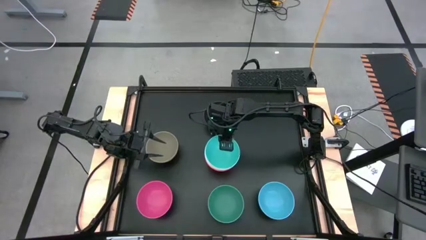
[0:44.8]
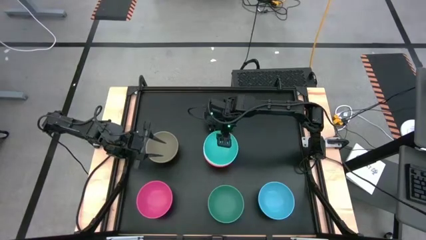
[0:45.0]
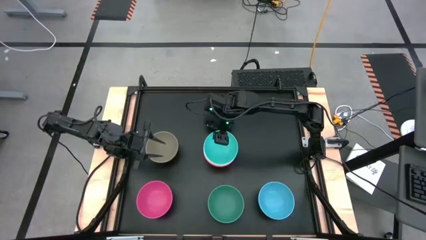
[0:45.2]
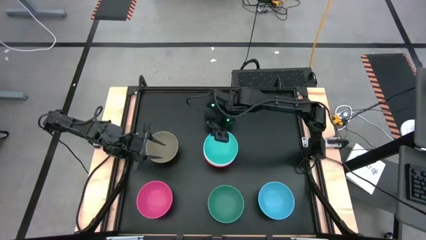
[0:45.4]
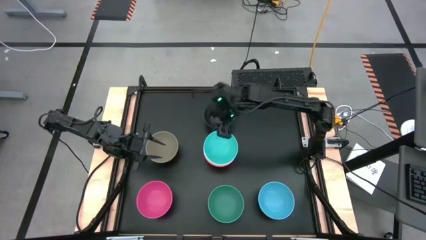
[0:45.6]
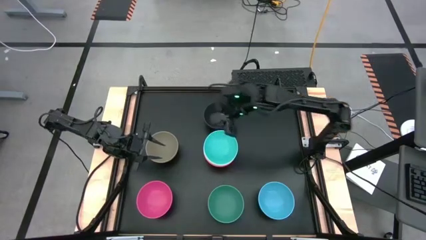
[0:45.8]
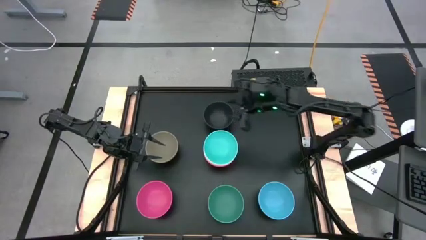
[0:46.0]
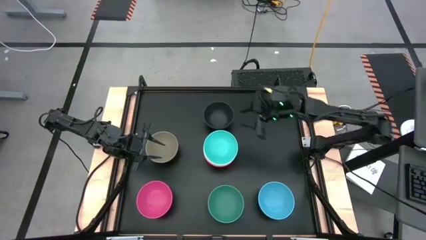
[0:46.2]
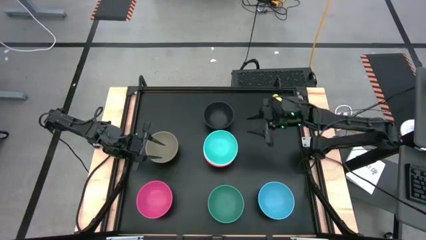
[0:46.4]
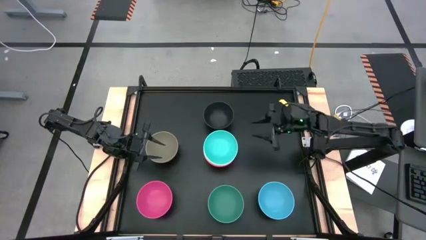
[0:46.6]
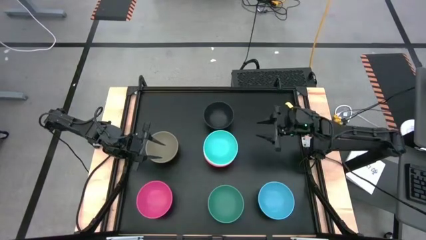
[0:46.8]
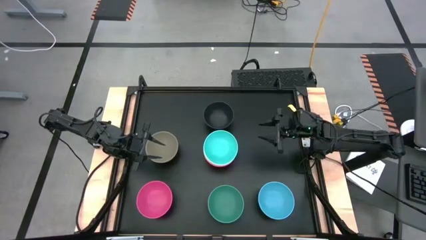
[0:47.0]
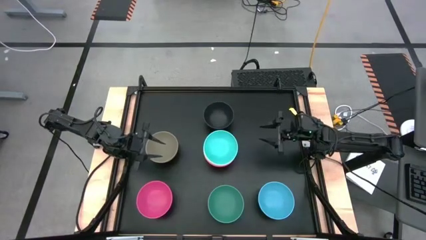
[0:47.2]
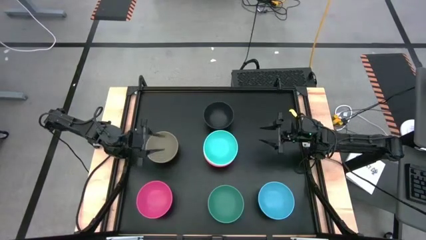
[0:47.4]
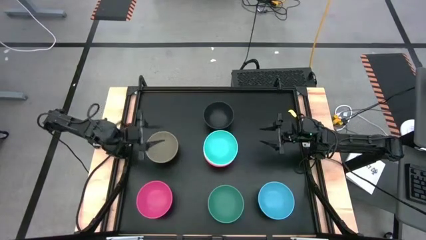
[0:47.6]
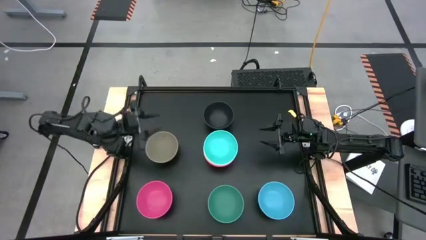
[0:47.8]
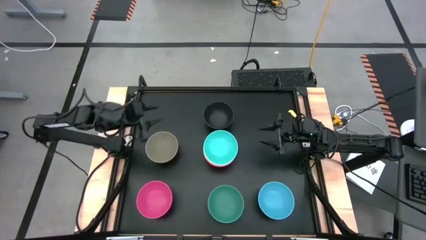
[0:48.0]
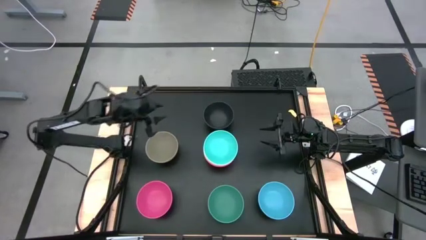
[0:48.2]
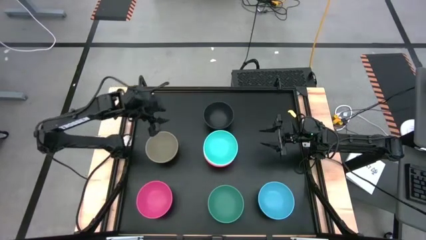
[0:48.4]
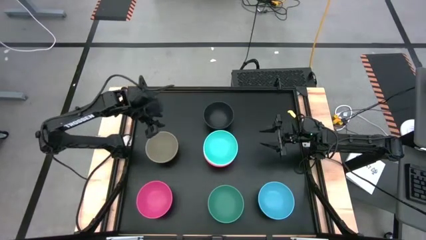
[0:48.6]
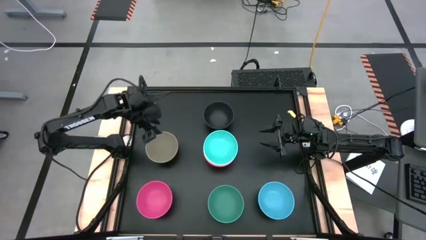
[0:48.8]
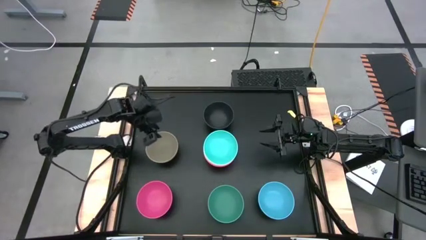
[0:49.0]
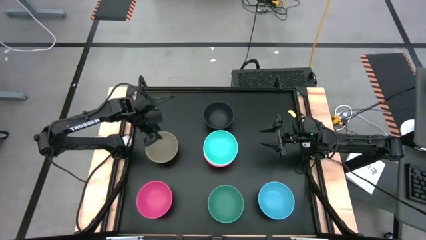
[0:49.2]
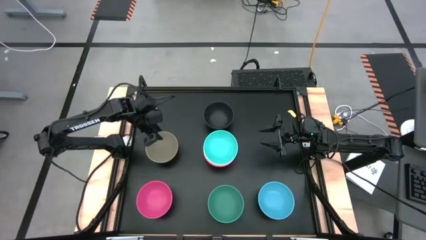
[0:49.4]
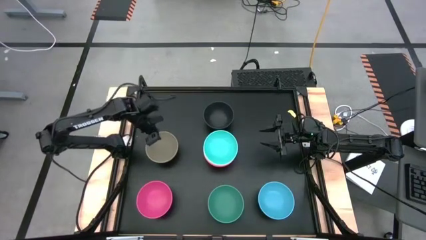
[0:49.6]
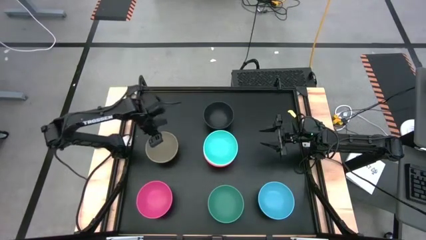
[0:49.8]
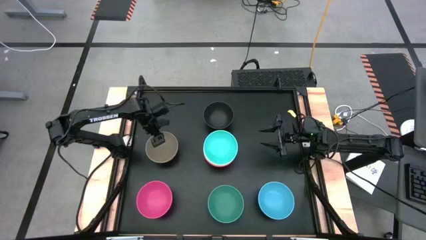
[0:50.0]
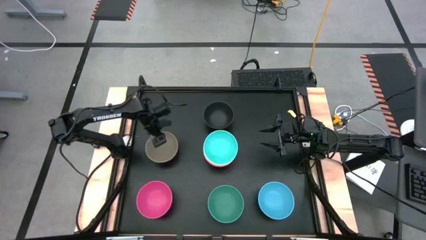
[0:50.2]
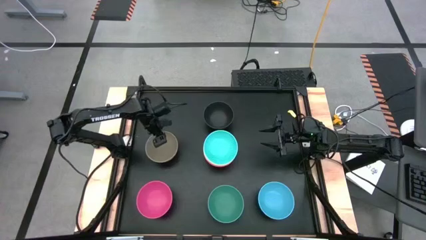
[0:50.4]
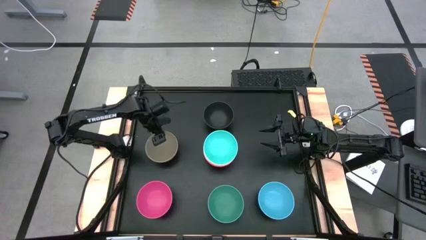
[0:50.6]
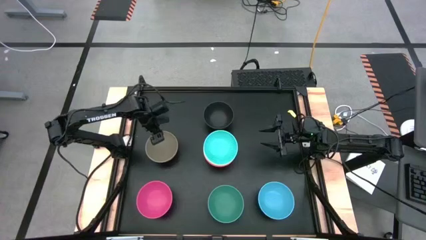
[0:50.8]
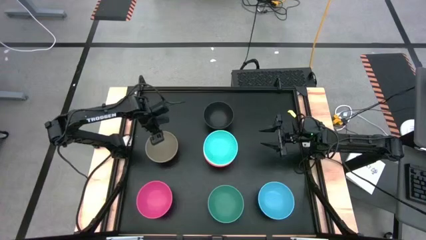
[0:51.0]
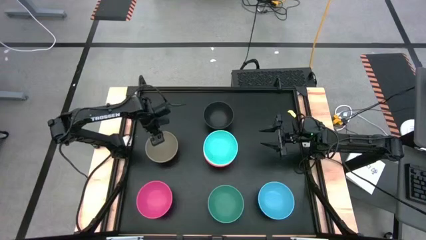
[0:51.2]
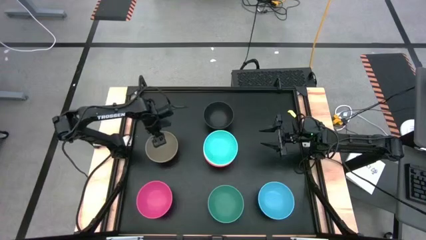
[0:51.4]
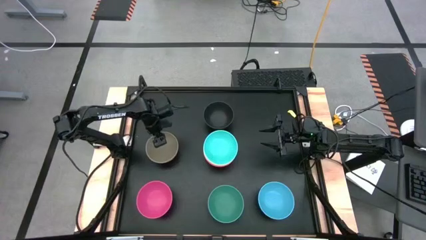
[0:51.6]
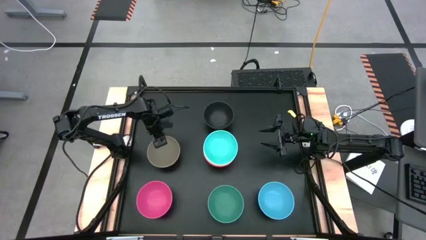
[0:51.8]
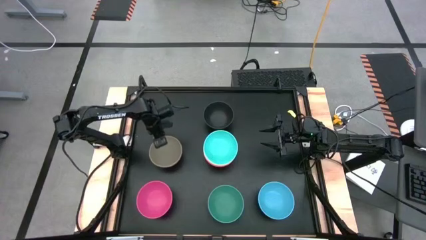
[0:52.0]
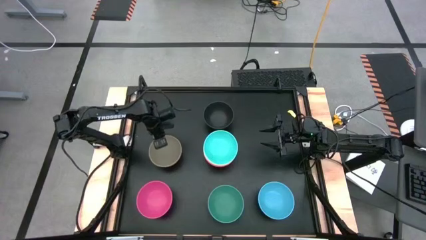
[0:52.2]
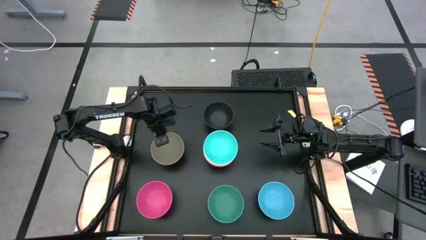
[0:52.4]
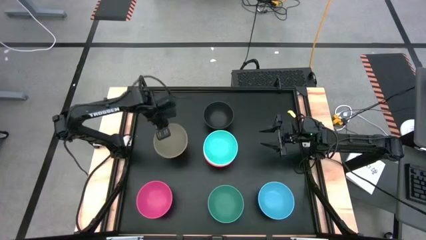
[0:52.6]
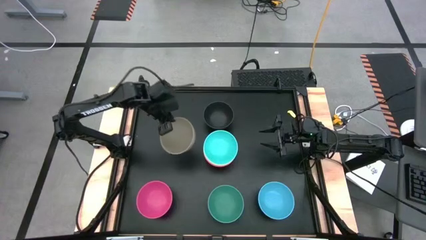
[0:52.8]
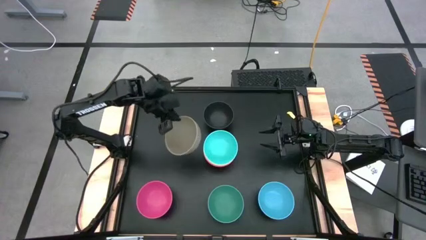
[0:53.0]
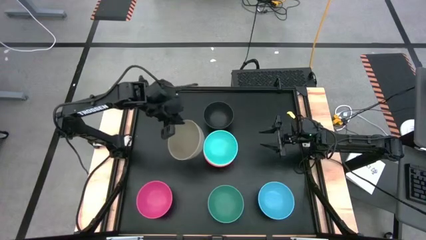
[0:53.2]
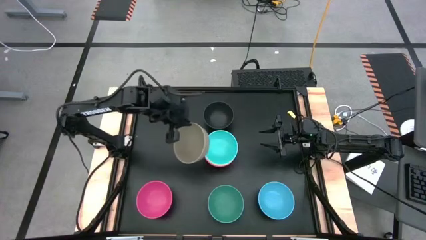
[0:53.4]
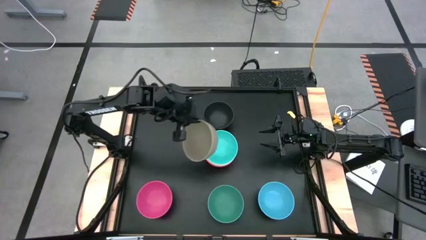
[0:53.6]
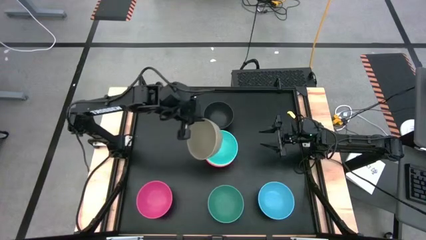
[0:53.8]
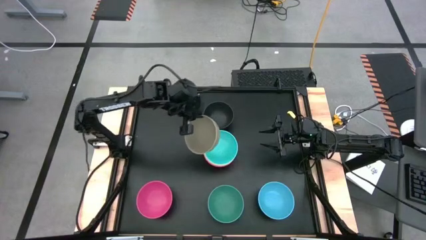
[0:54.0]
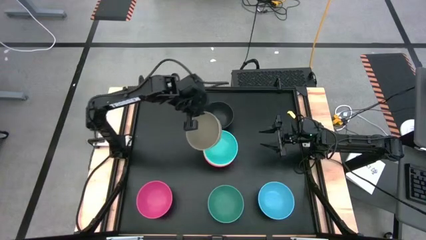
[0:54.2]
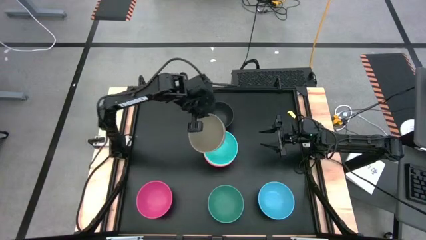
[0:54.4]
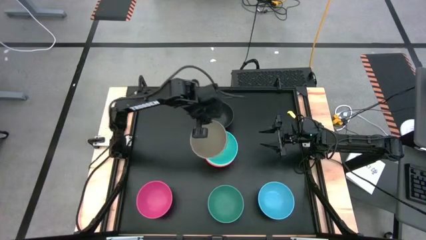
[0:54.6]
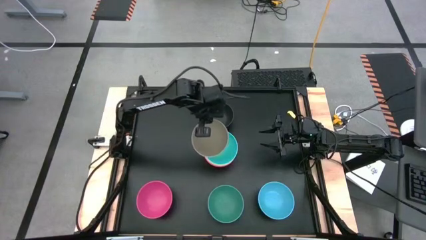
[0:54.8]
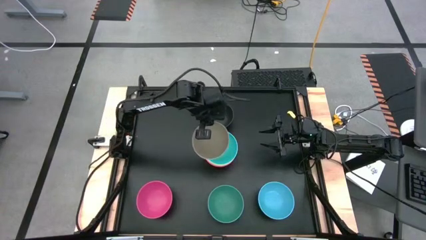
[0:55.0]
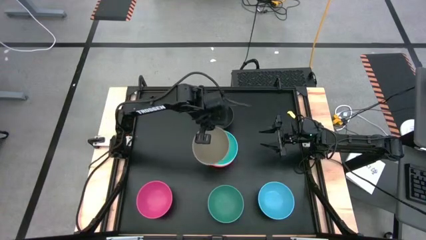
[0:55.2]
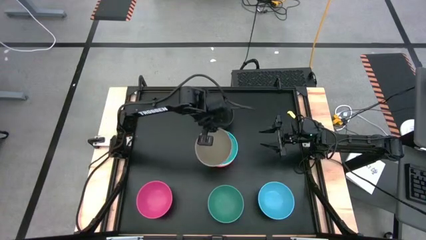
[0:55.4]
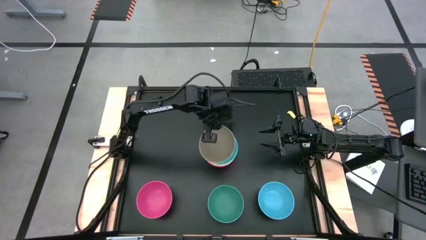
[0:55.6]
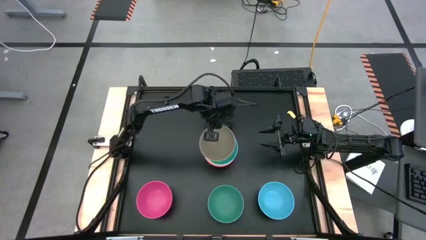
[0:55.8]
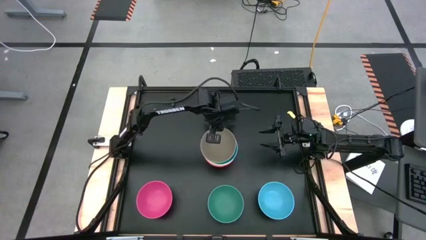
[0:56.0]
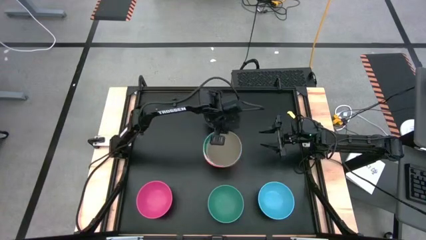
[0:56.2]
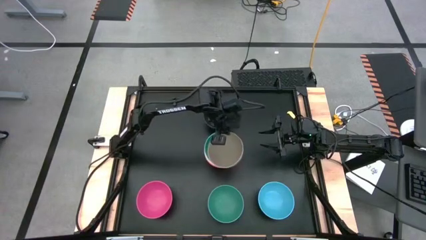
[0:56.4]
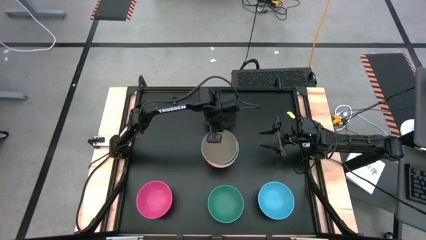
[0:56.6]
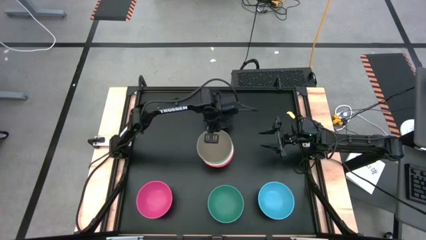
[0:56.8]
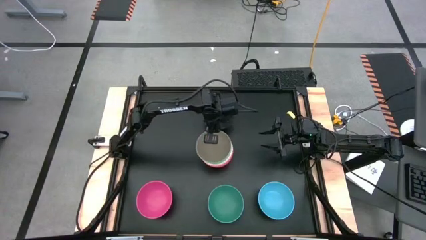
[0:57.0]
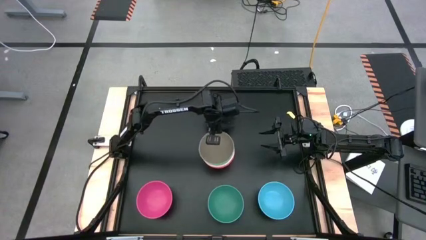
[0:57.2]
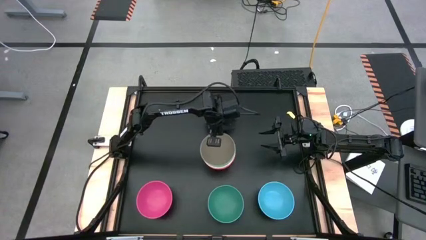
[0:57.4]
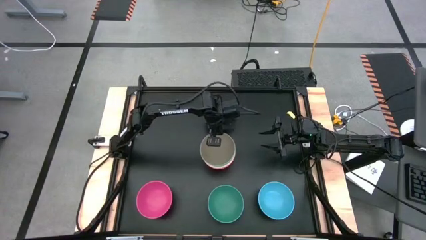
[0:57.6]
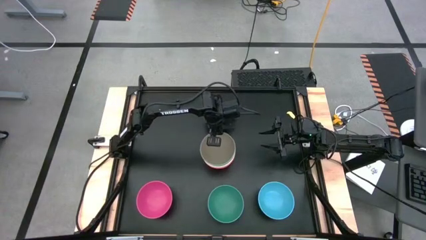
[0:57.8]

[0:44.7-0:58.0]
Task: Nest bowls inside each other
Stack the gray bowl on the light blue bowl

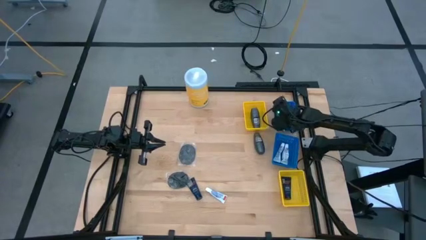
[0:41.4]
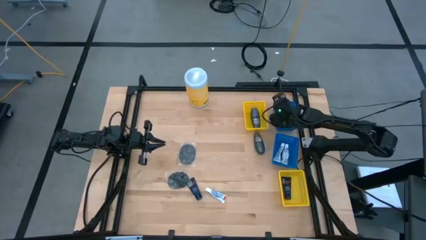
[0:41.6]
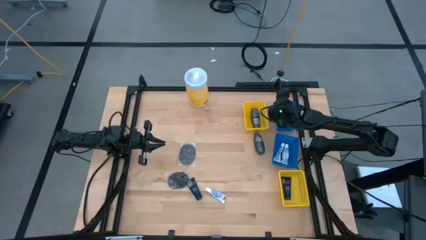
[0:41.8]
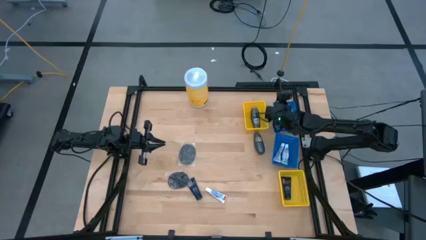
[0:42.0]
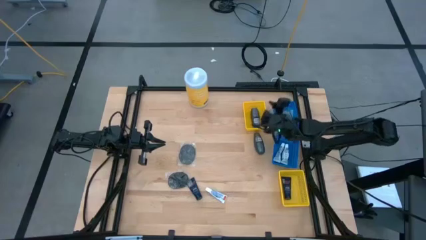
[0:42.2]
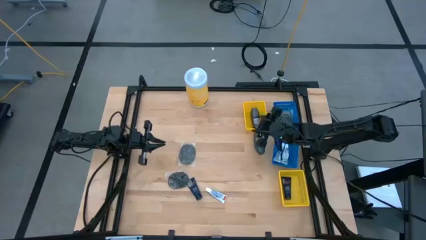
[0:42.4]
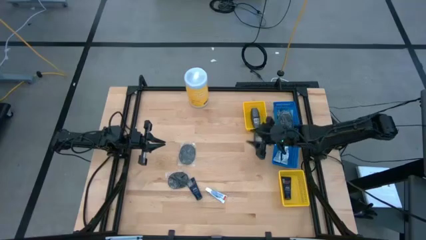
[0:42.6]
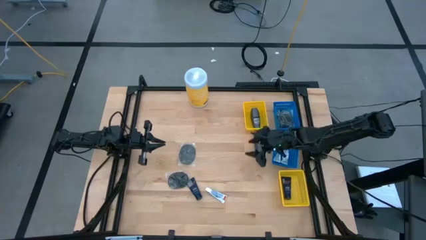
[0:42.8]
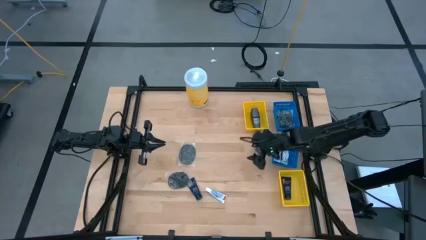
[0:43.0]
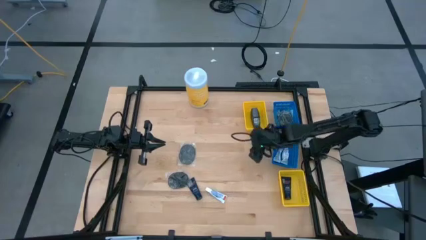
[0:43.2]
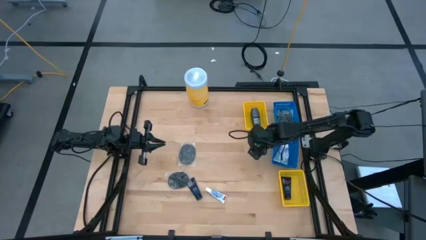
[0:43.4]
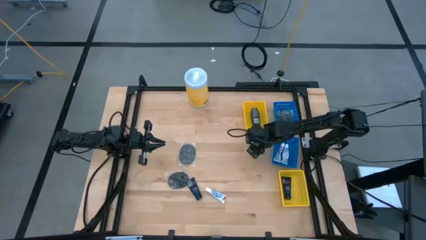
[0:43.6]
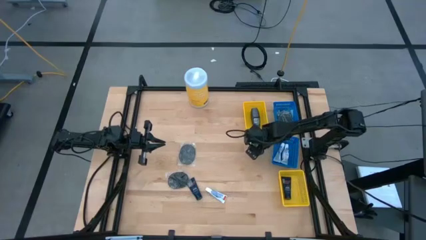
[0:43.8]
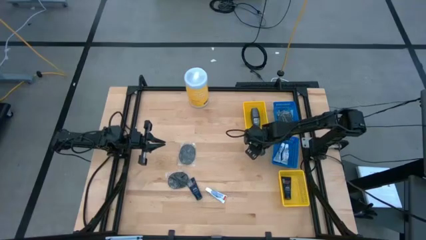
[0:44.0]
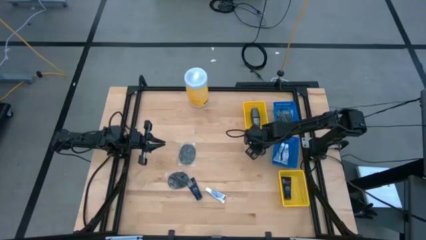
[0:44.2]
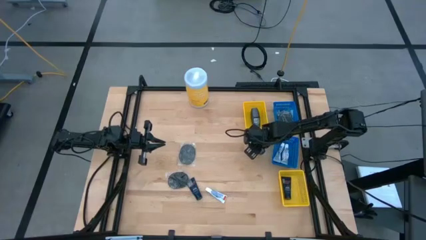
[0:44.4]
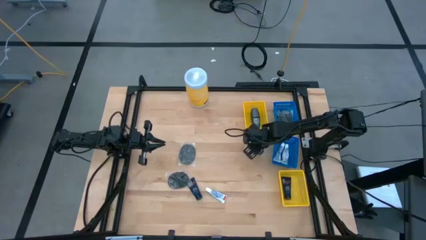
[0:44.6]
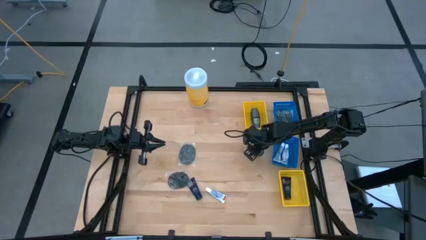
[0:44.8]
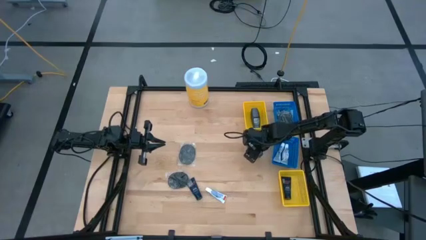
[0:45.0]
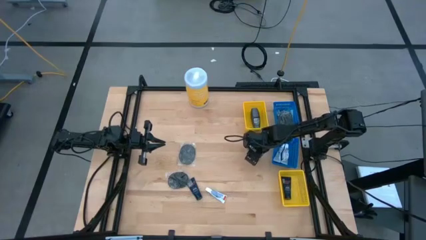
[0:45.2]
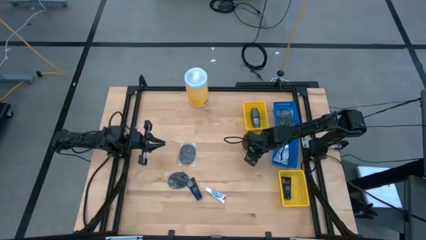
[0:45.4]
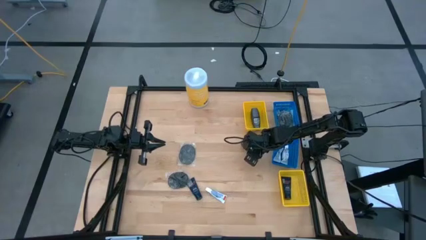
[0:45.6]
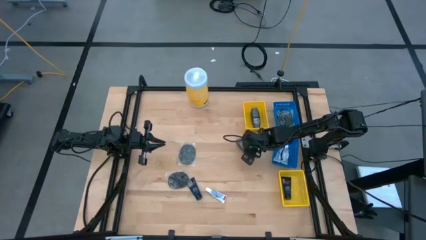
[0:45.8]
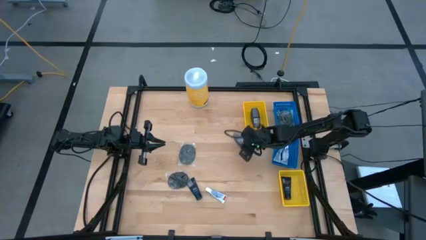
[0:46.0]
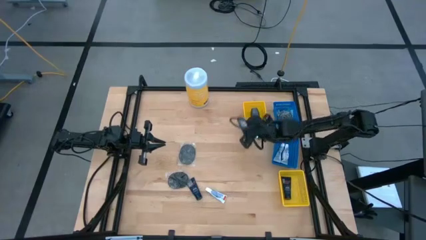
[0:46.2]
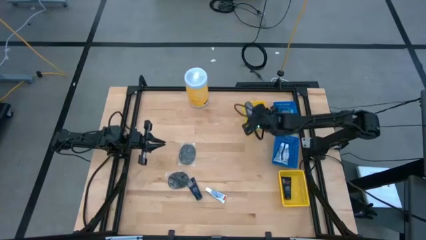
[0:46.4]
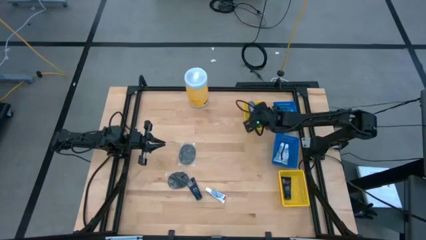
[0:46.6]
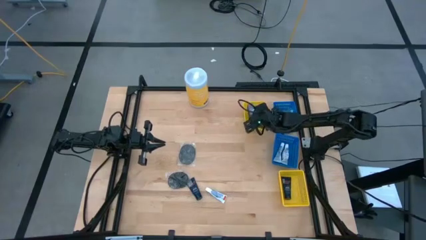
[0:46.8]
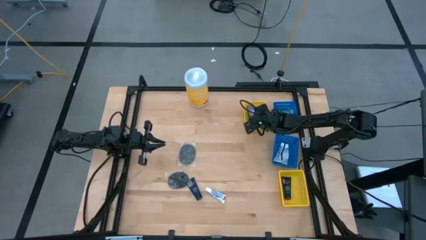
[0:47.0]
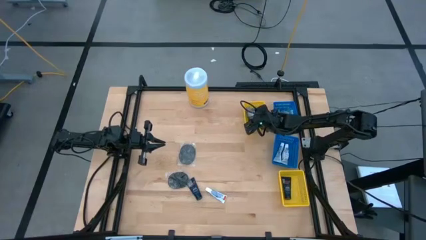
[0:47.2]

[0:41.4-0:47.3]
Task: Pick & Place Travel size toiletries
Put the black deodorant into the top yellow basket
